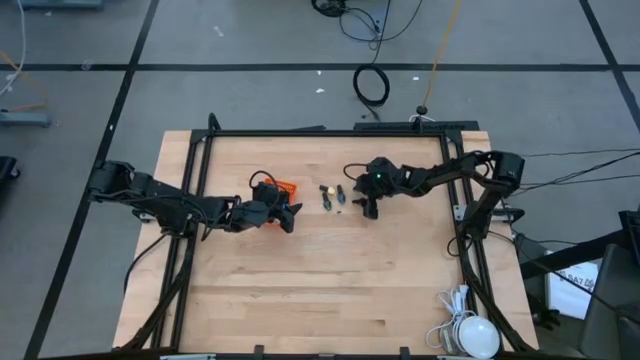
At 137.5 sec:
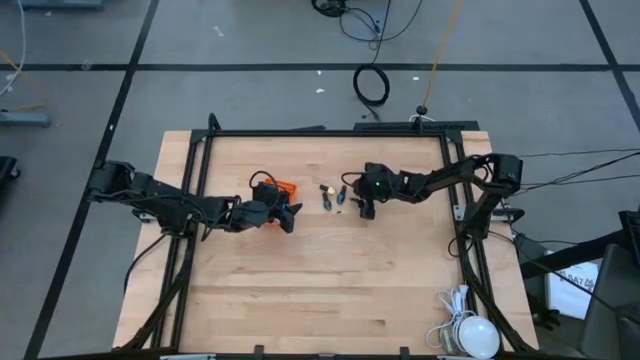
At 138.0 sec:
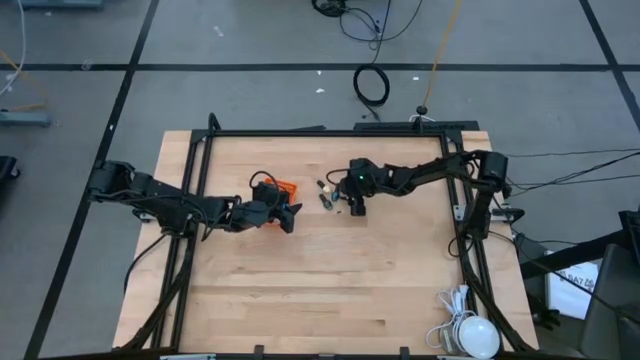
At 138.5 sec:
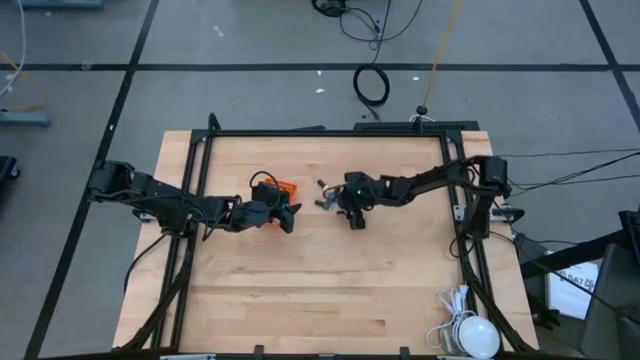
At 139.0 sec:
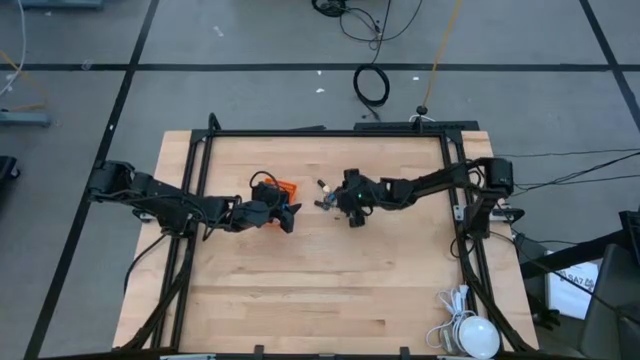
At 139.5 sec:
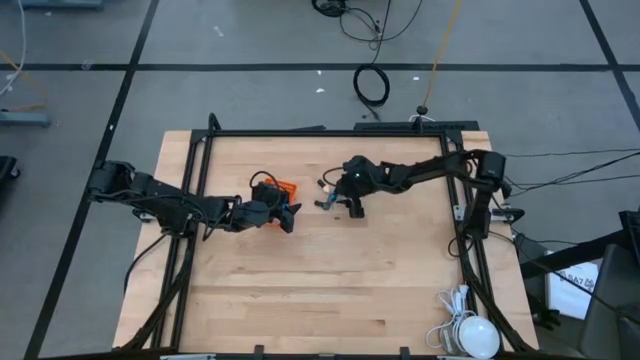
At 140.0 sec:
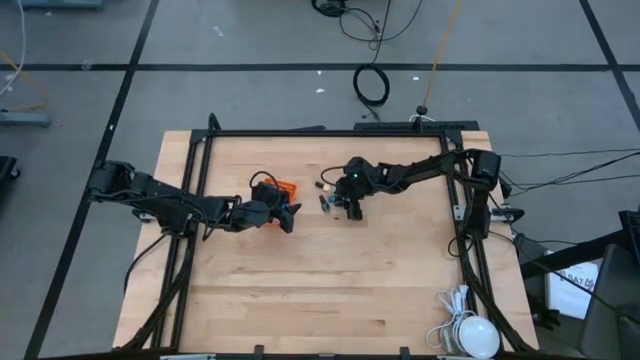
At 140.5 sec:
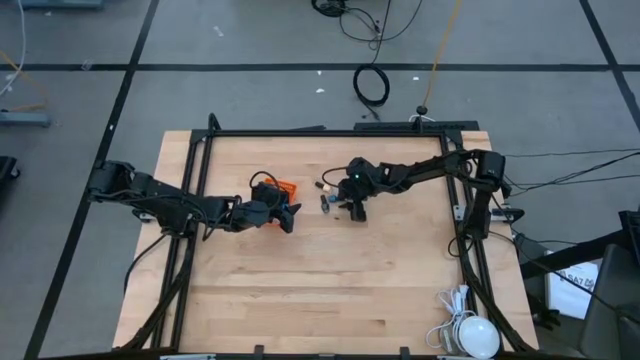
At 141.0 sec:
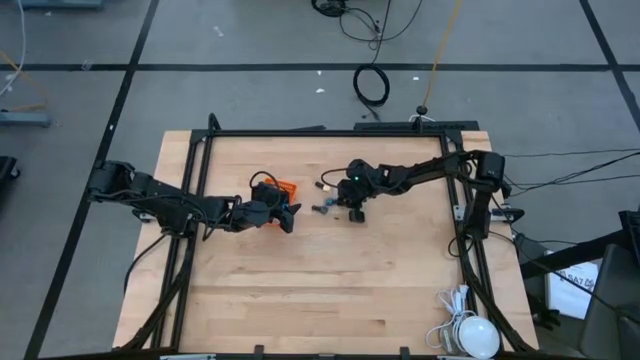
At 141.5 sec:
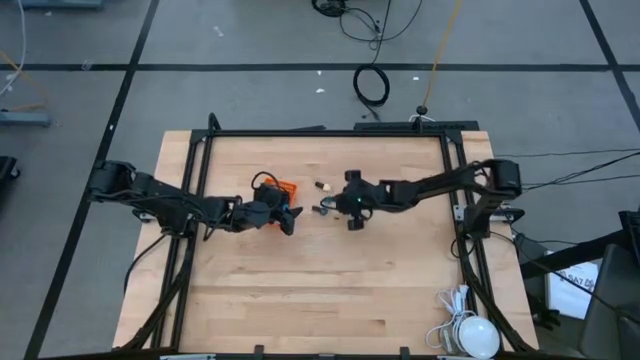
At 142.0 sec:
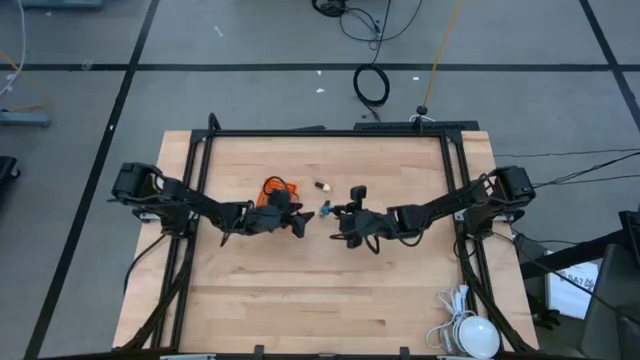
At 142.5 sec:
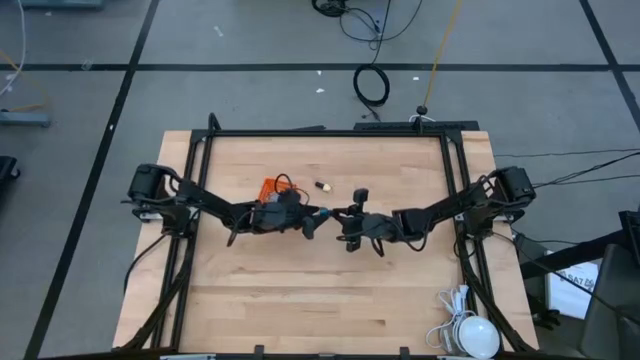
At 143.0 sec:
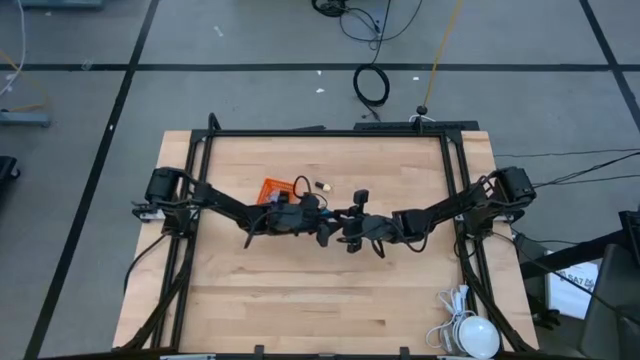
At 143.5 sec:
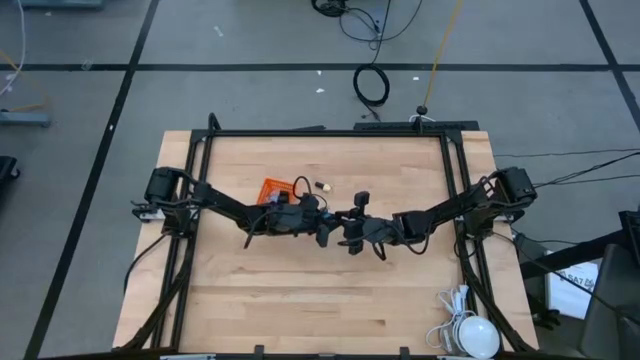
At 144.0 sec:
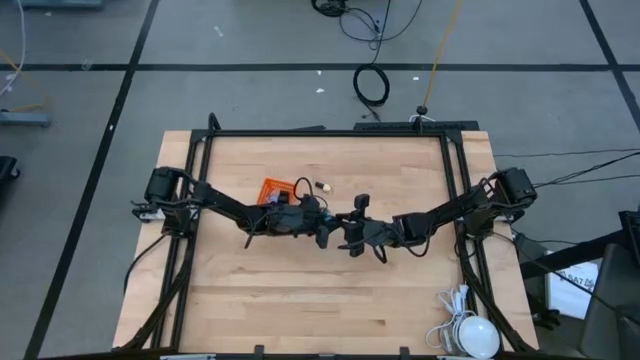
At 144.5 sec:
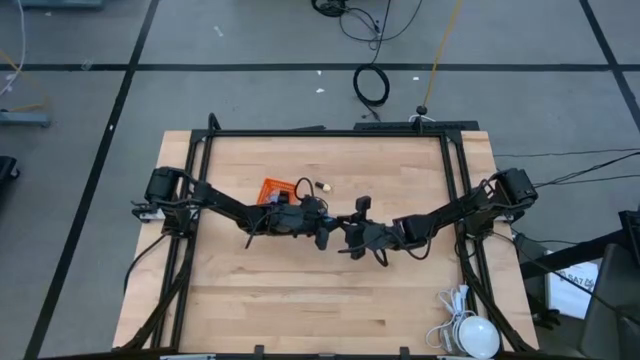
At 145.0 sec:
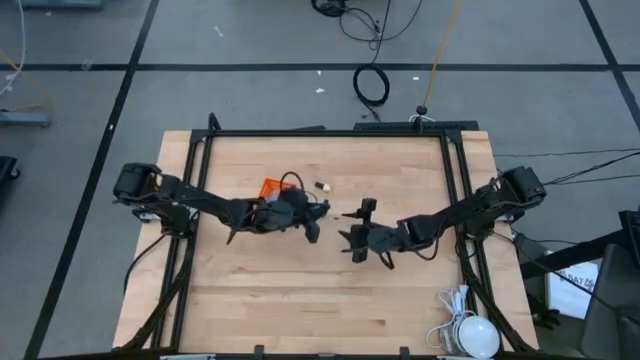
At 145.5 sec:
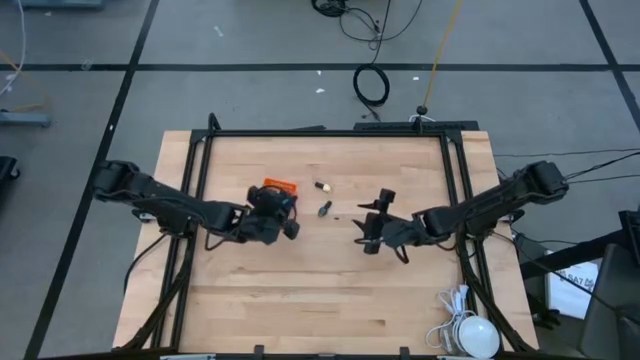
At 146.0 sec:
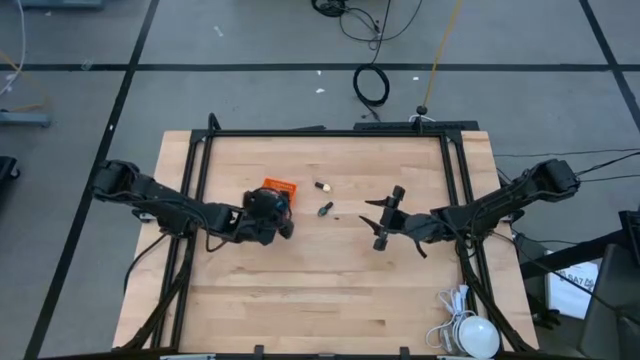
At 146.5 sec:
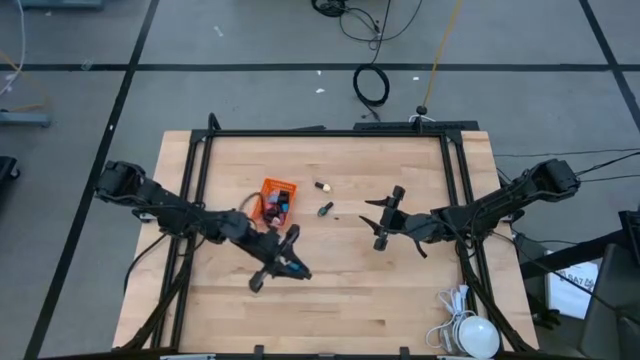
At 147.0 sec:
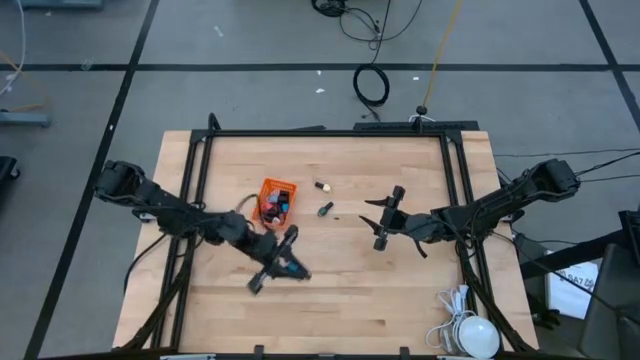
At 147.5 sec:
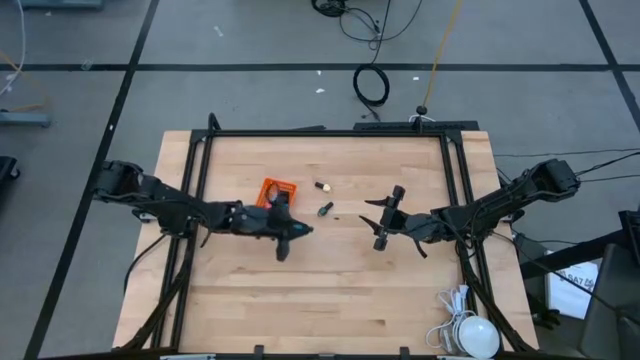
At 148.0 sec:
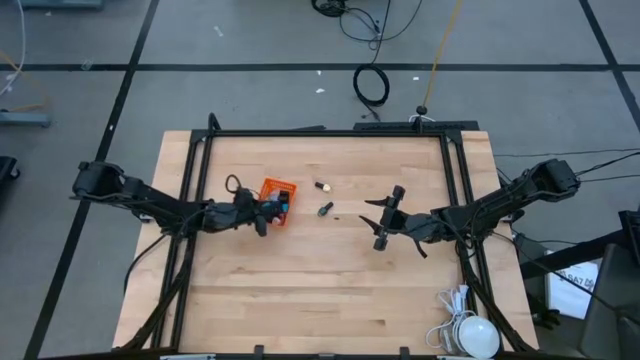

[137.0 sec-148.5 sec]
Task: Pick & Place Nail Polish
Put the dark blue nail polish into the orange basket

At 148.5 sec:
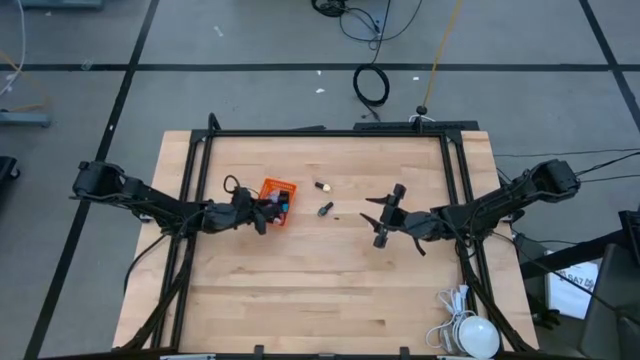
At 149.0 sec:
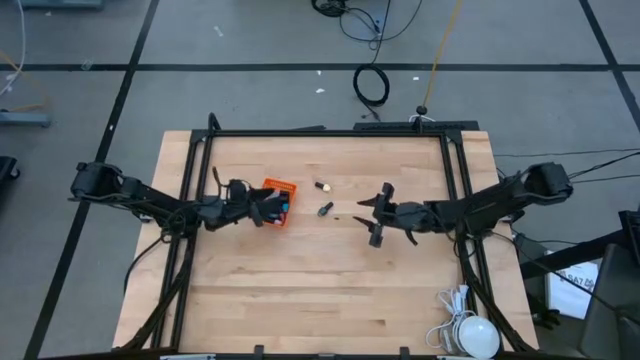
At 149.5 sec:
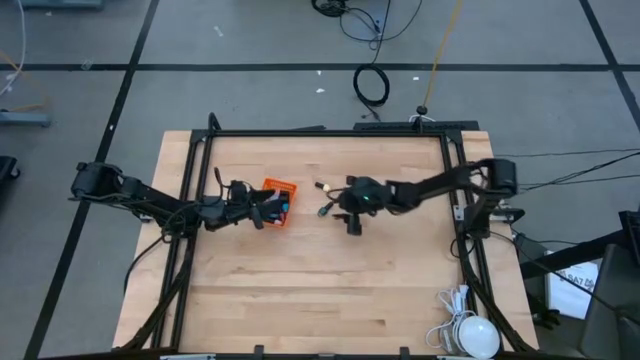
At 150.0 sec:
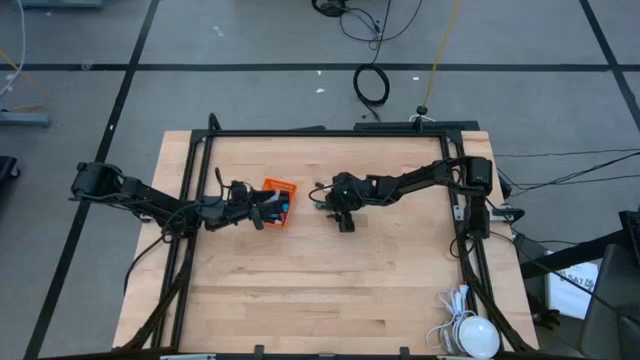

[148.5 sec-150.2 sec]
Put the dark green nail polish into the orange basket

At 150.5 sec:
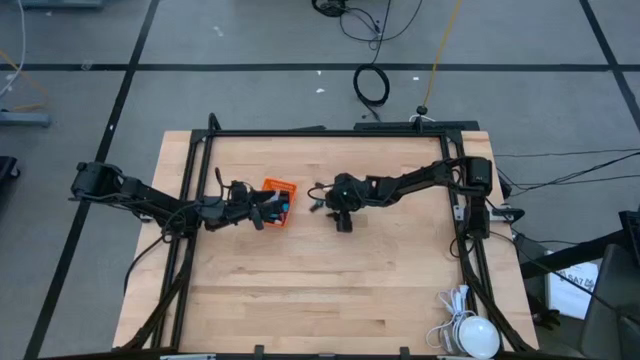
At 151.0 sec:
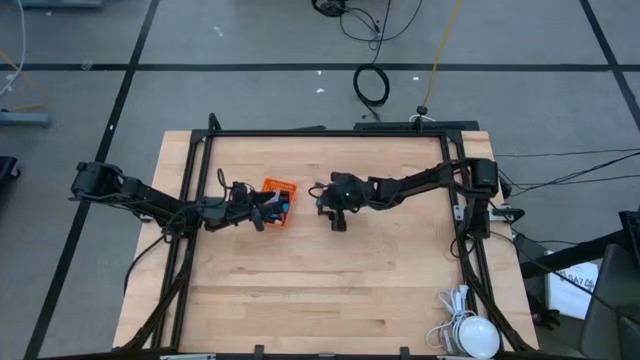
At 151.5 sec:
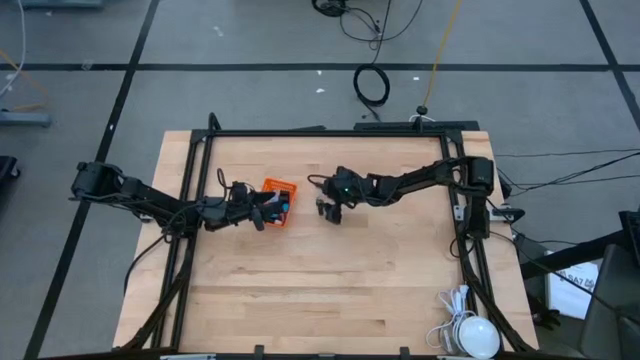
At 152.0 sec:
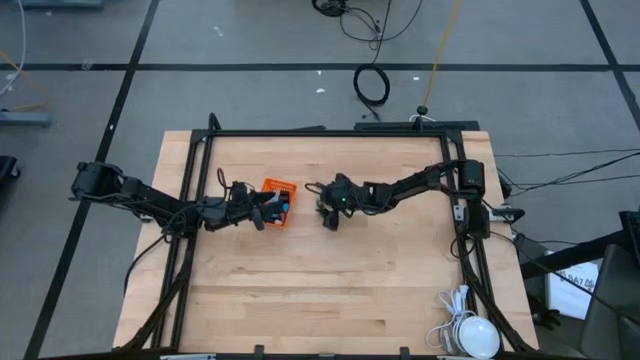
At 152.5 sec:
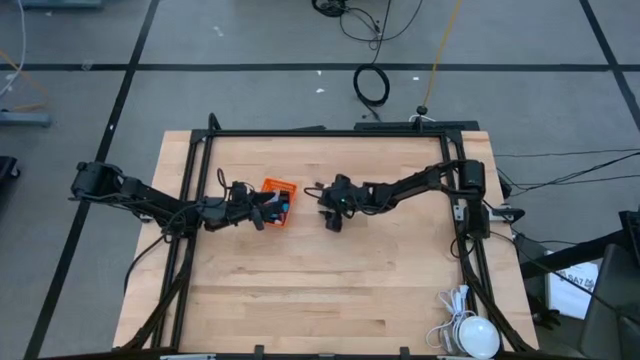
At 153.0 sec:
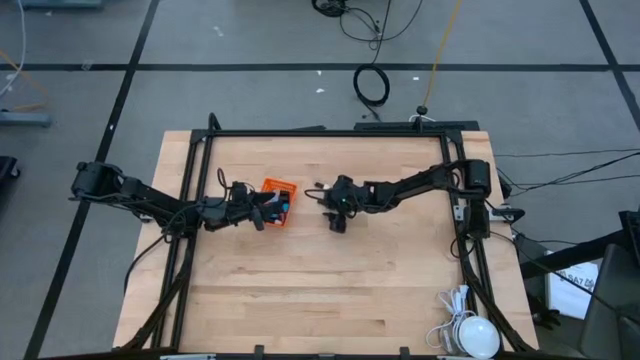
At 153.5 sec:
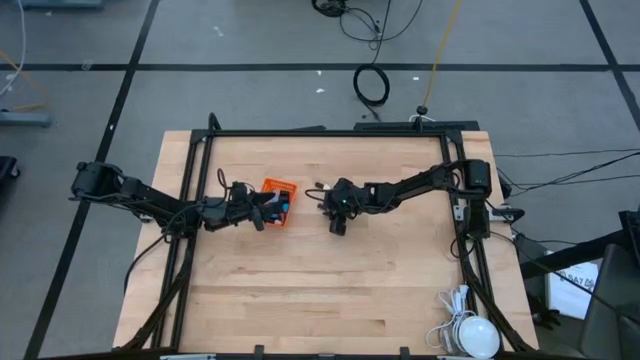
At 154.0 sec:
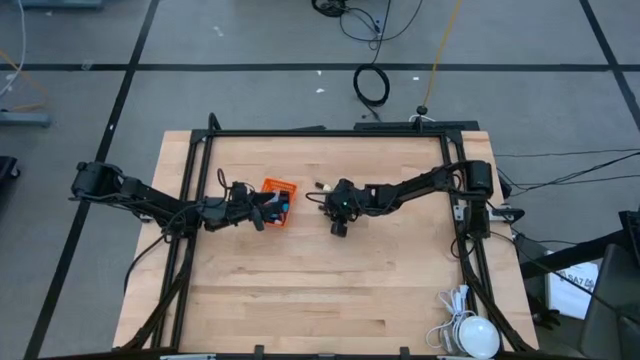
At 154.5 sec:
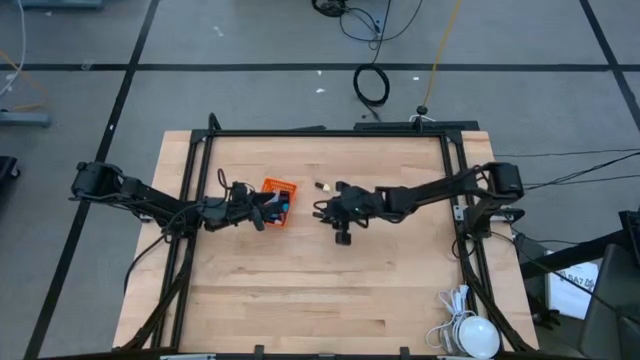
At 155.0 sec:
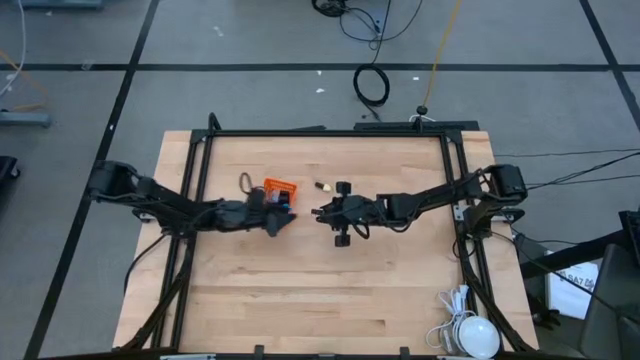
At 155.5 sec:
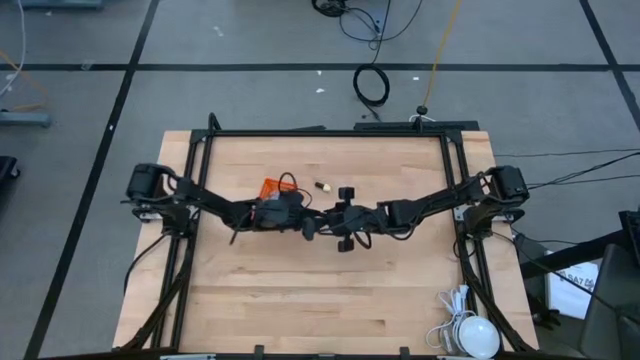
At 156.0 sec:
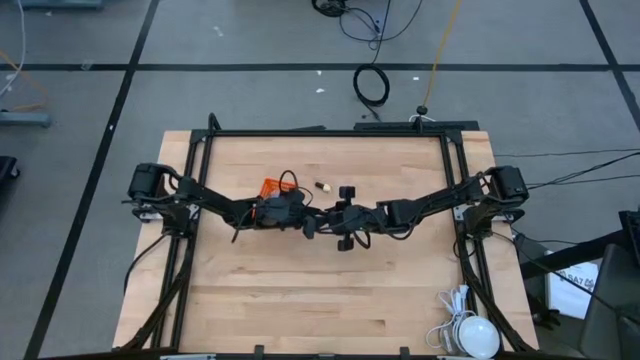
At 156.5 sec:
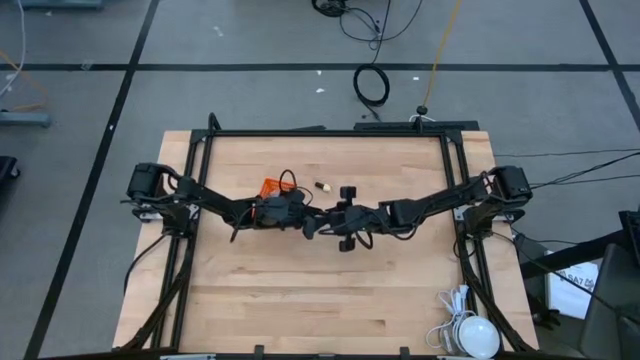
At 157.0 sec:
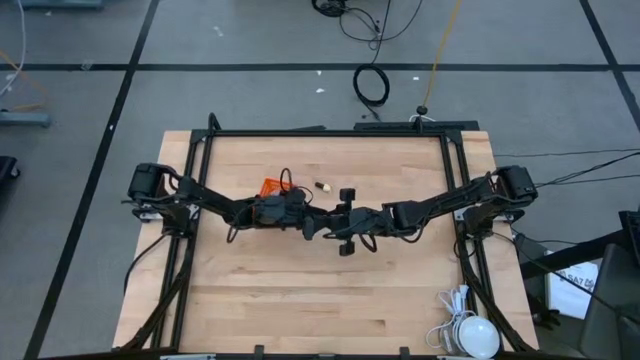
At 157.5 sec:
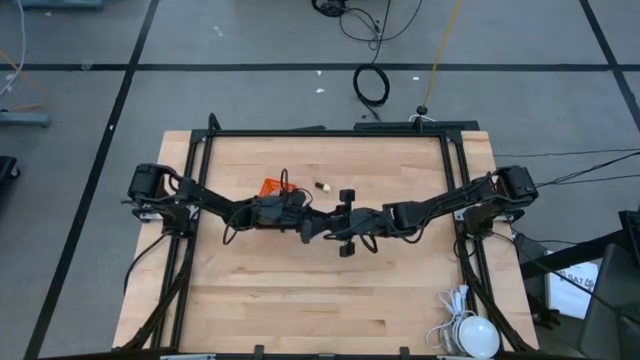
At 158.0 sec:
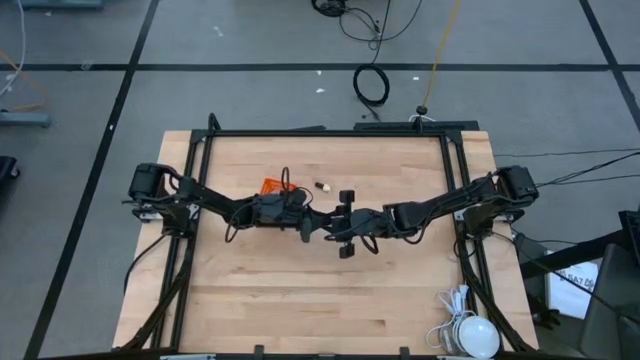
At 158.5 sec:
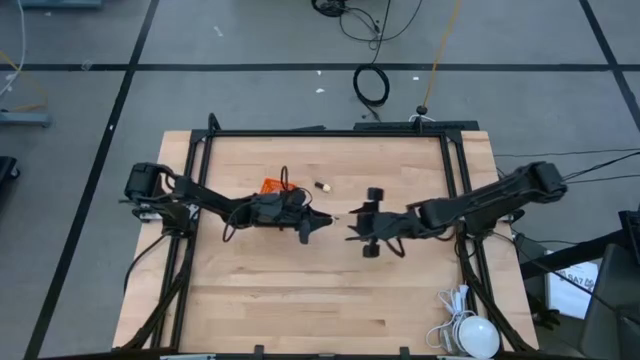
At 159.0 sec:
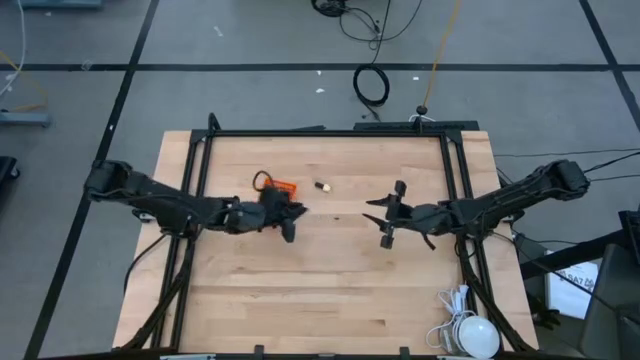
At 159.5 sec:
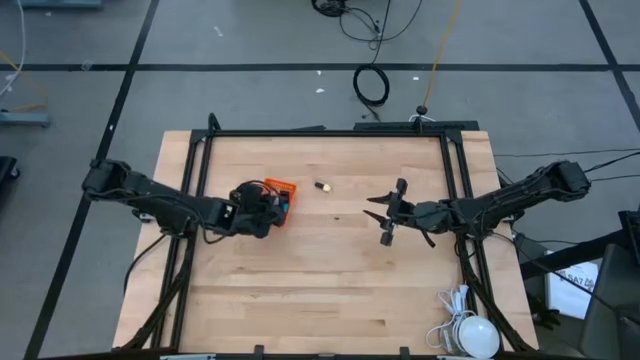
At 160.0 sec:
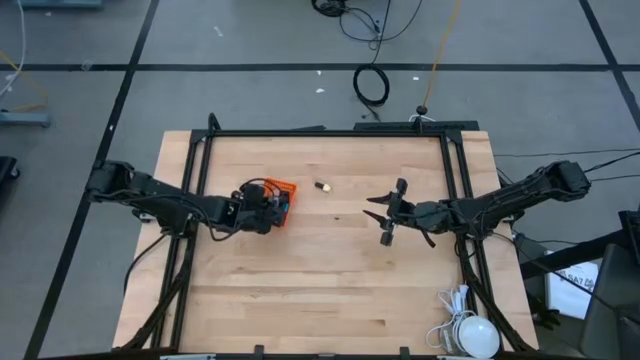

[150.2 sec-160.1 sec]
Put the dark green nail polish into the orange basket
